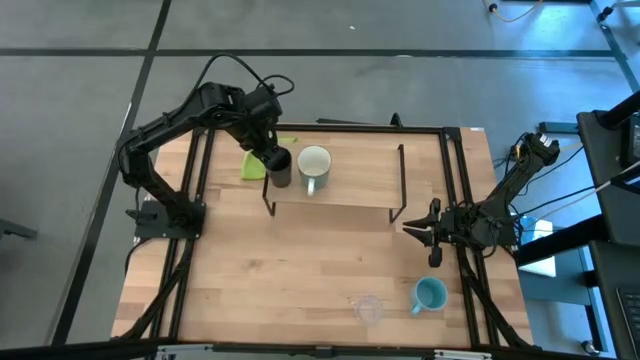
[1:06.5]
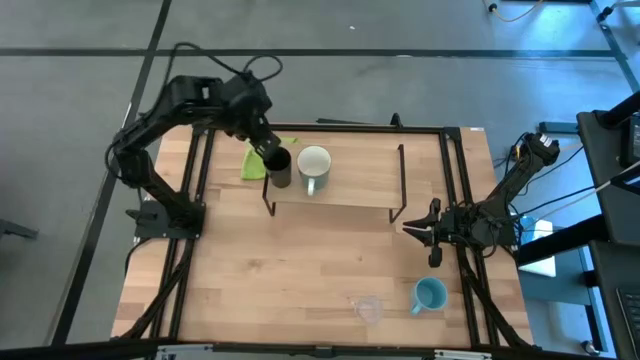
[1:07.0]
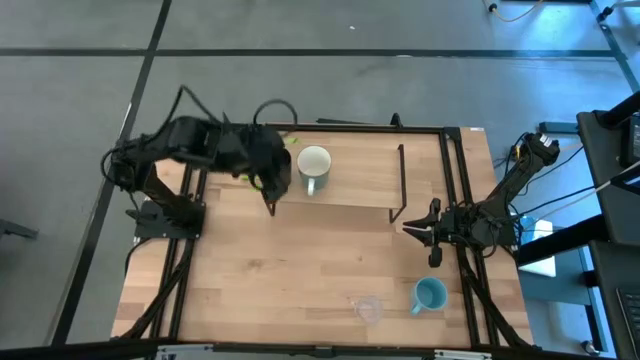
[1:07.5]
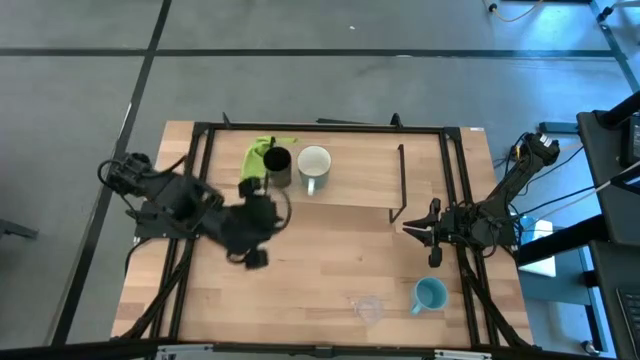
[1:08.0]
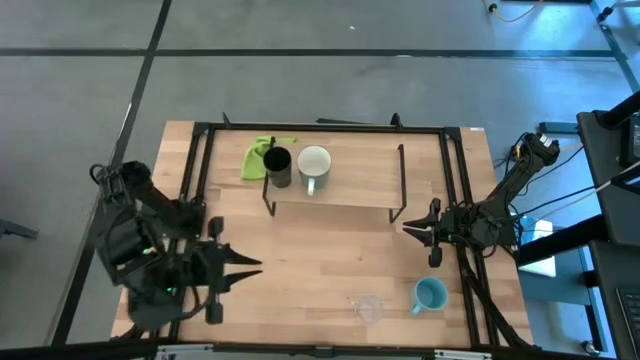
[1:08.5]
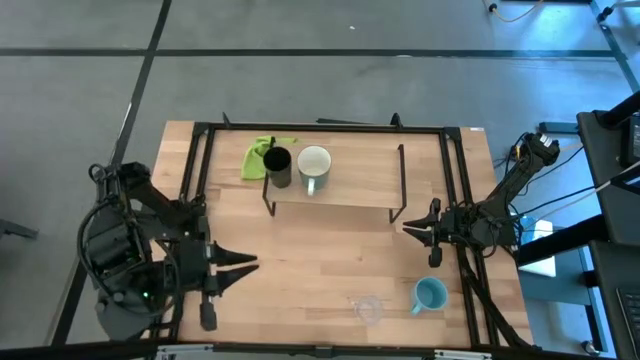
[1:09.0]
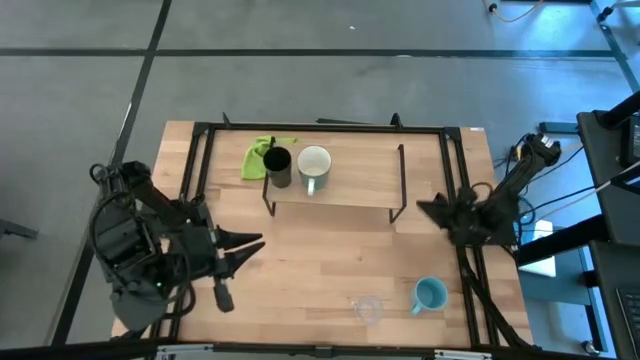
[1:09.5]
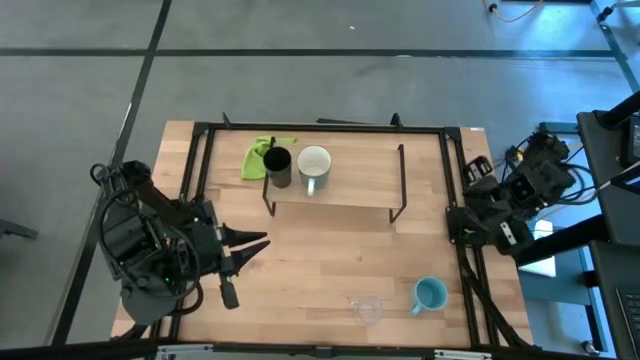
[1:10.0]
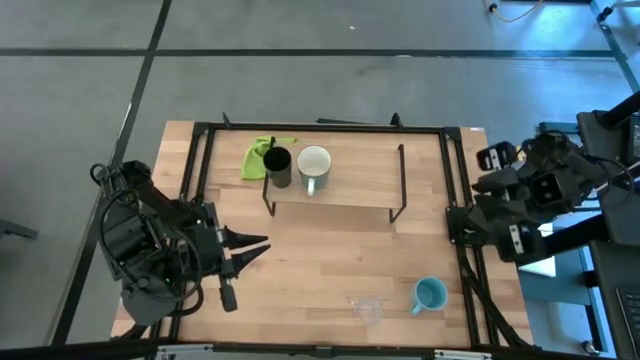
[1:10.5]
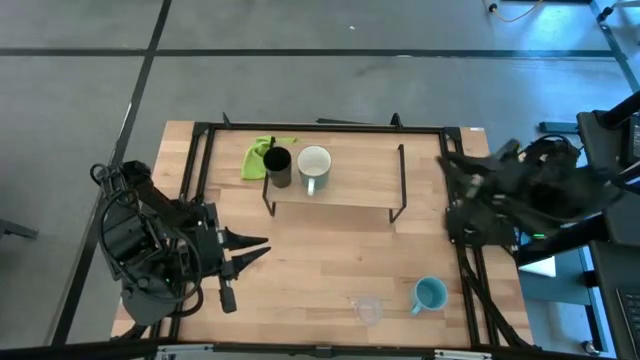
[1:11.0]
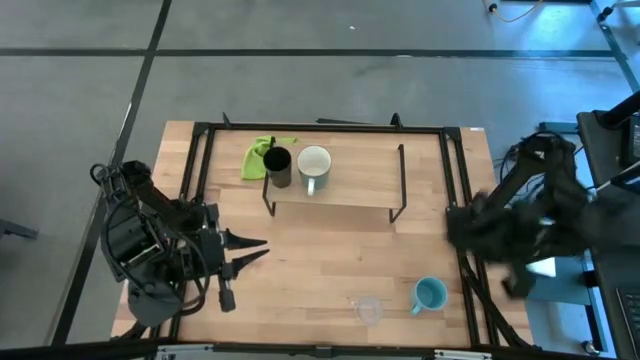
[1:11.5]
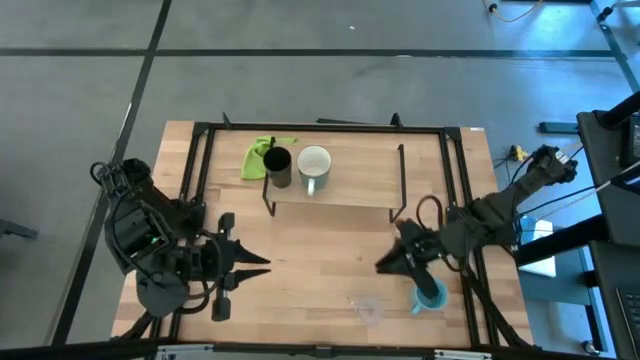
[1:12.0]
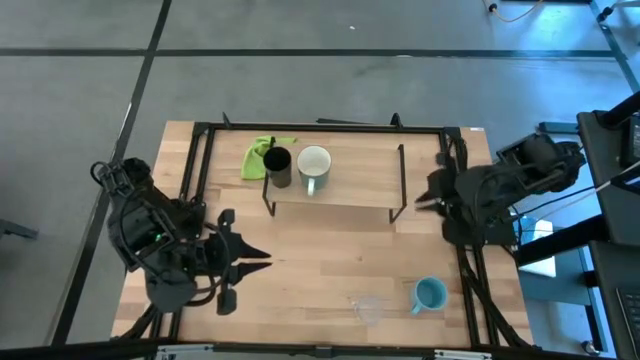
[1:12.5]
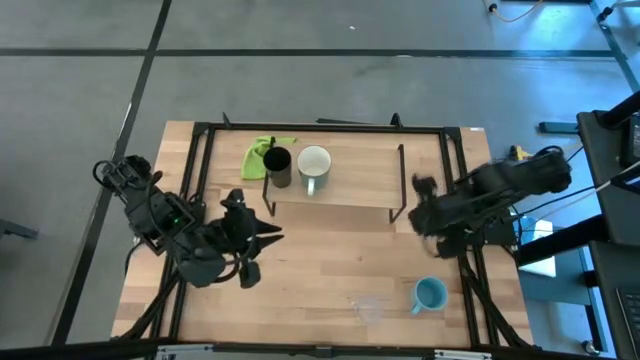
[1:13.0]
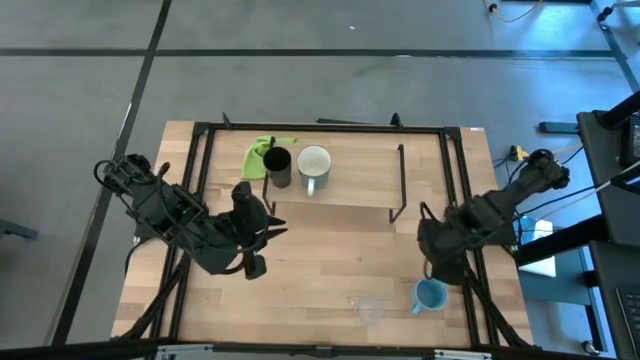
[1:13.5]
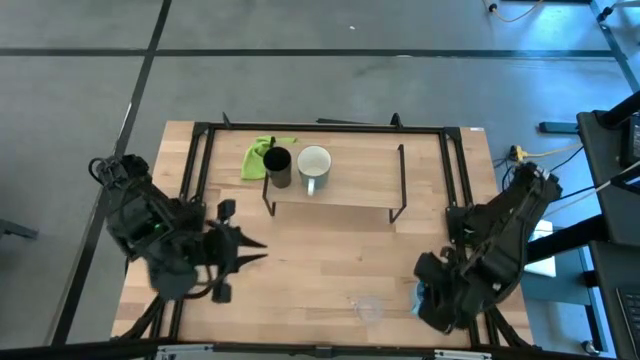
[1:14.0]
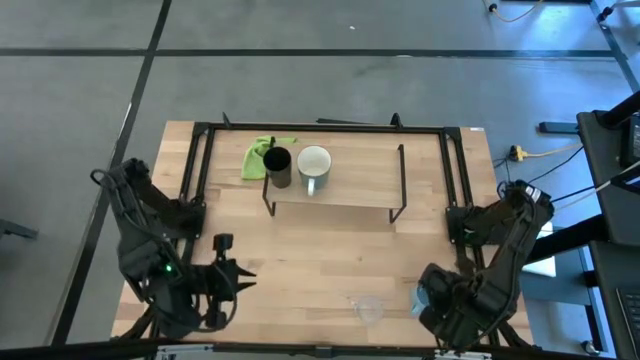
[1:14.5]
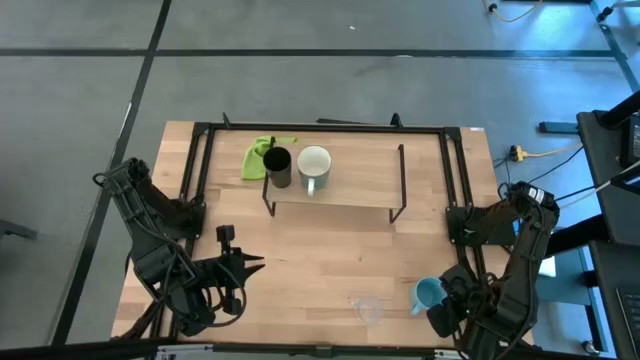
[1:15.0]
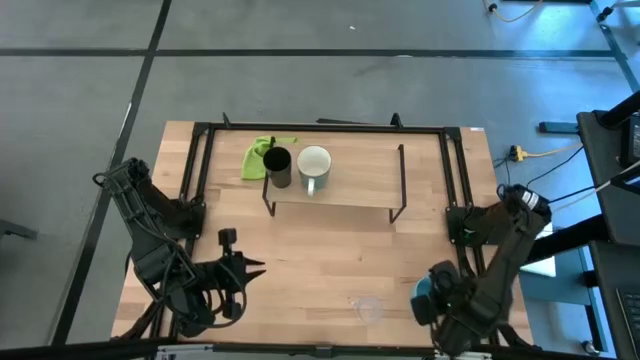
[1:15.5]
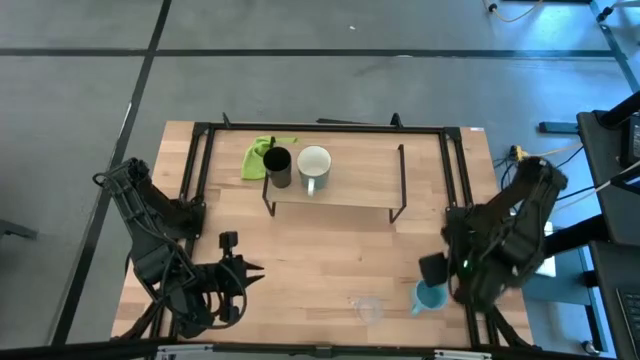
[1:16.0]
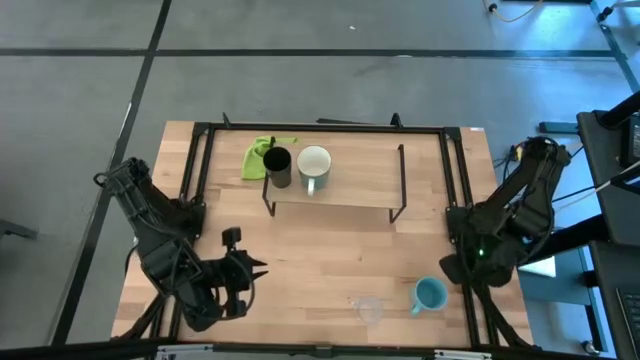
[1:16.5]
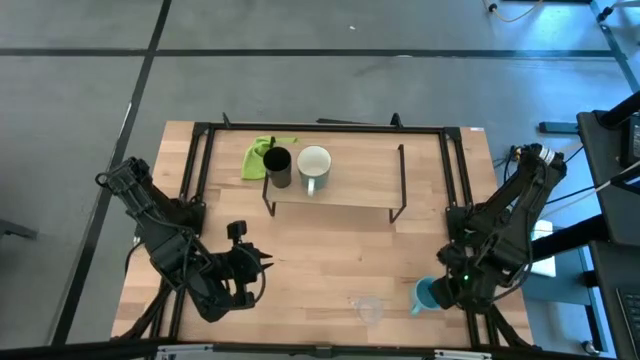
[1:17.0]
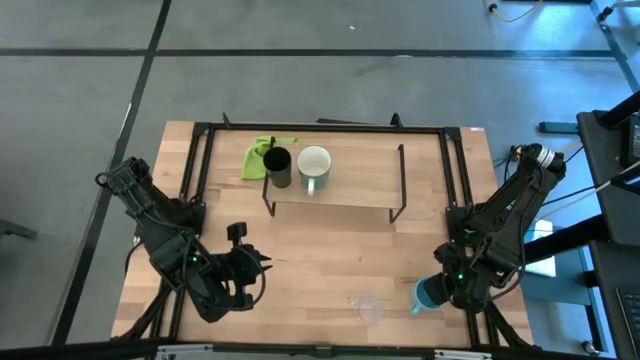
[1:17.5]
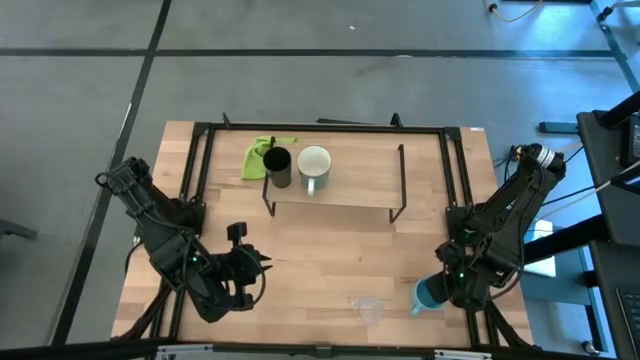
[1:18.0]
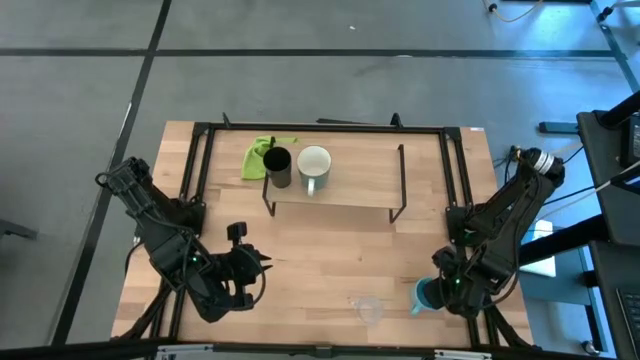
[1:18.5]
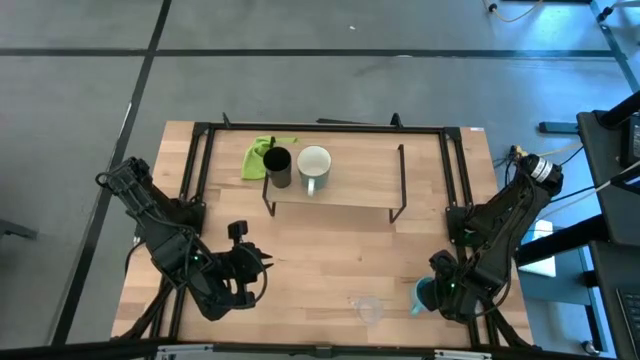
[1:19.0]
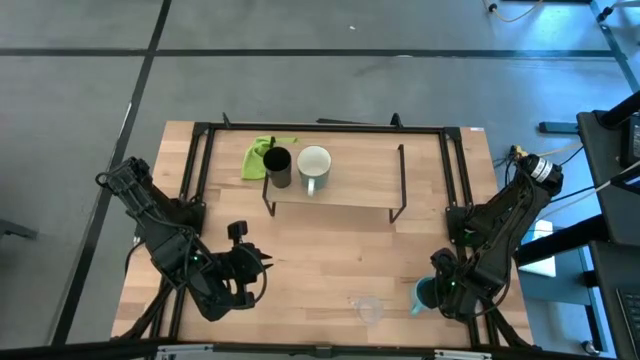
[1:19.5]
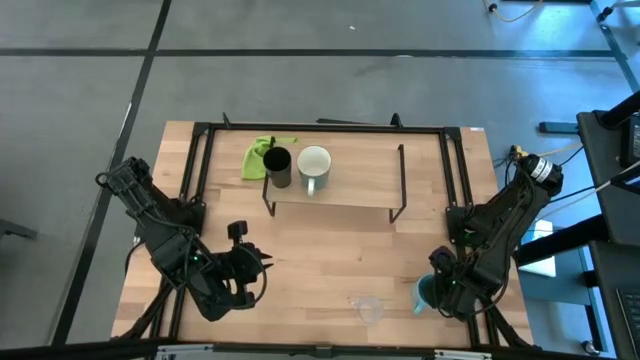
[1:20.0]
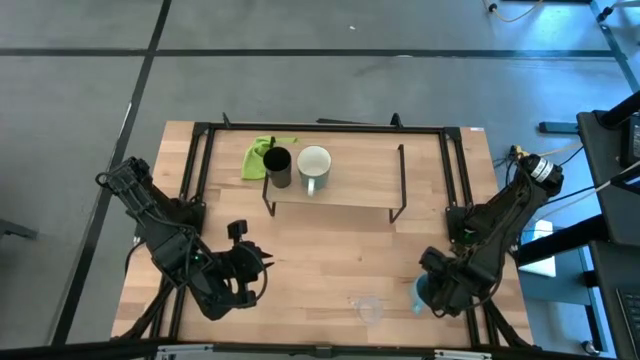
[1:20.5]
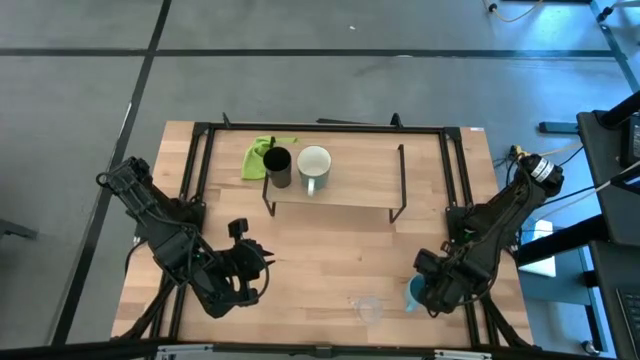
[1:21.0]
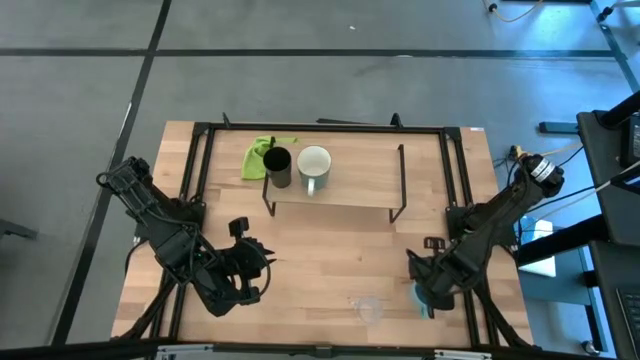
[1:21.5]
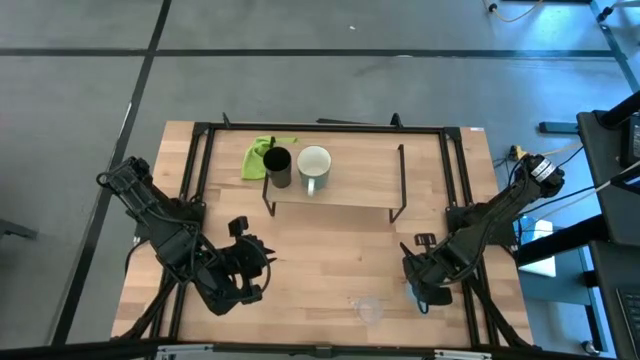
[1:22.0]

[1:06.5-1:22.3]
Task: Stack small to large cups/mugs on shelf
Put the blue mug on the shelf

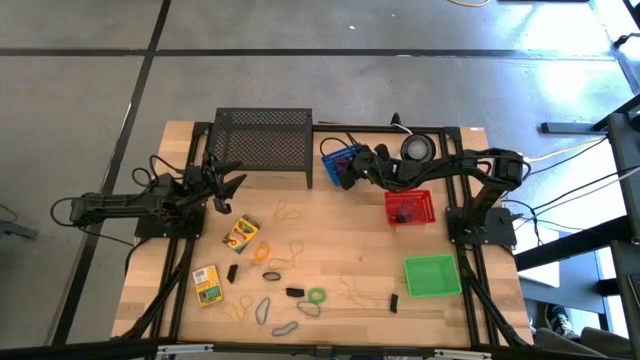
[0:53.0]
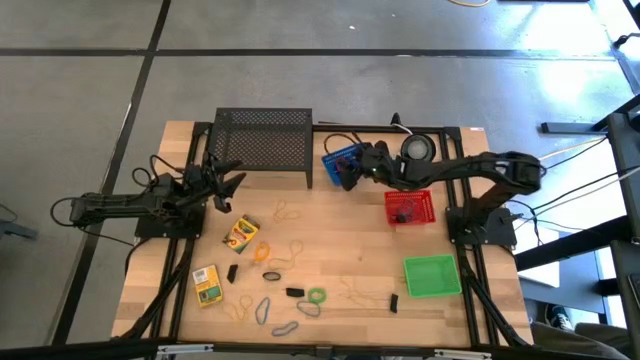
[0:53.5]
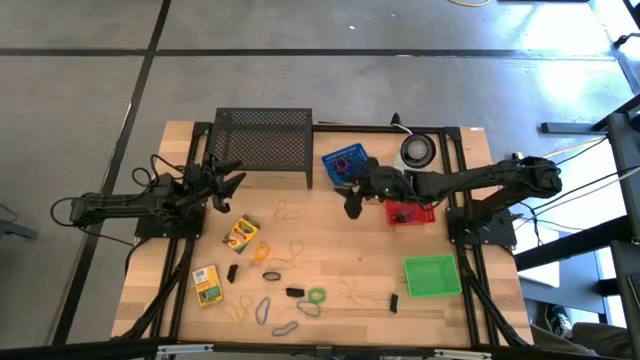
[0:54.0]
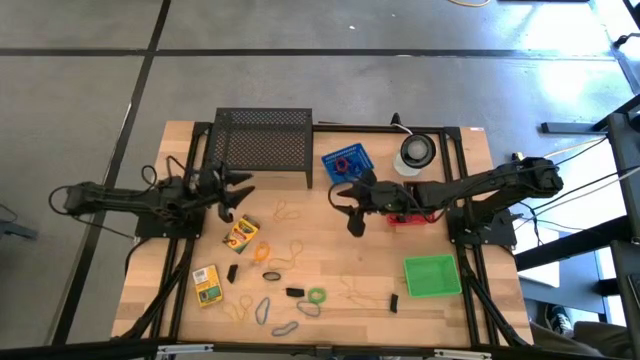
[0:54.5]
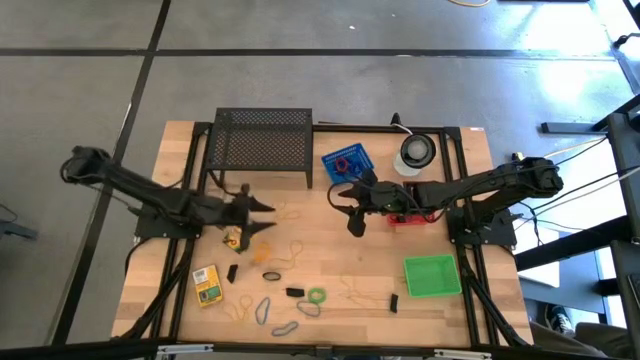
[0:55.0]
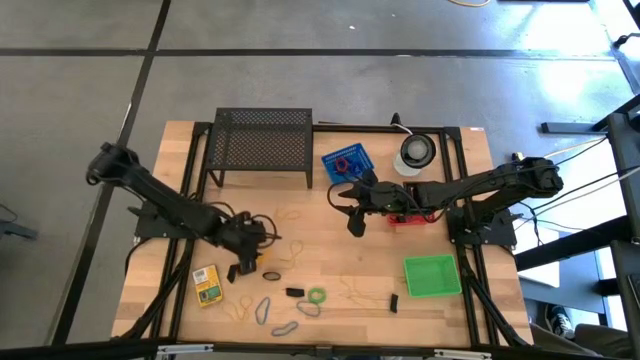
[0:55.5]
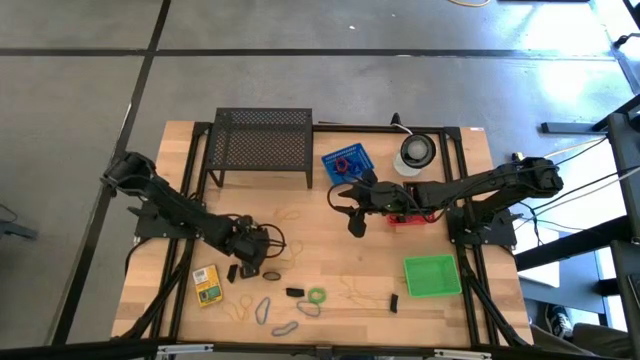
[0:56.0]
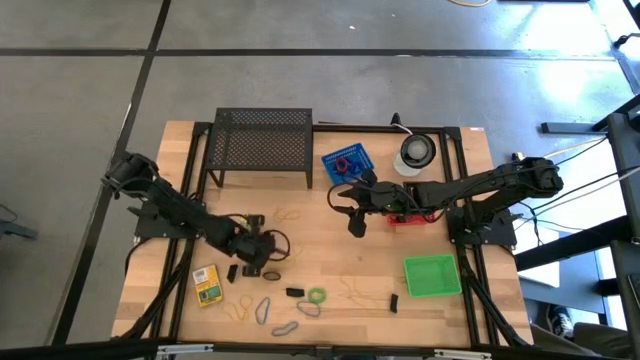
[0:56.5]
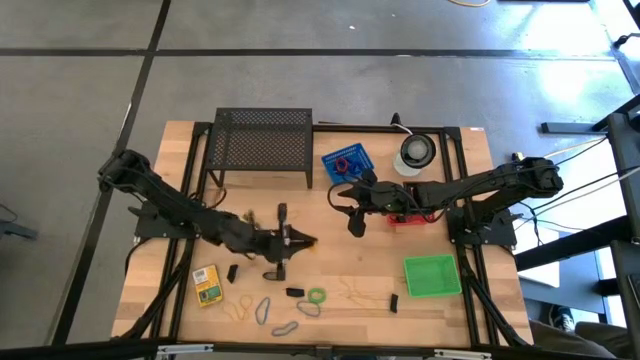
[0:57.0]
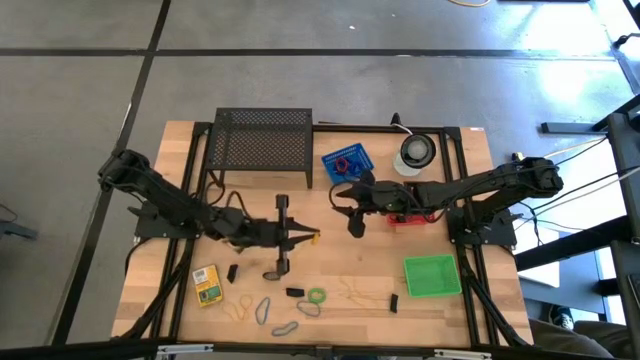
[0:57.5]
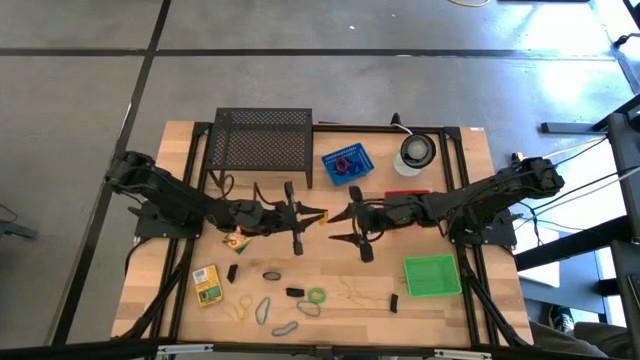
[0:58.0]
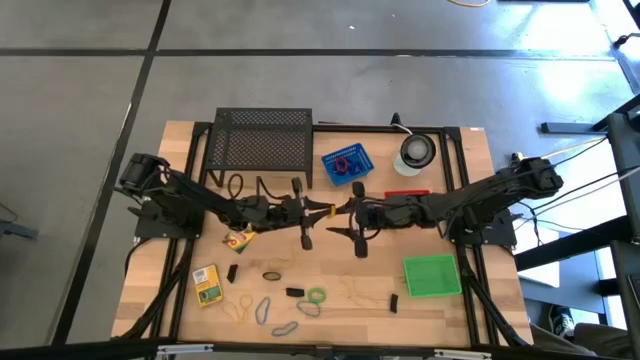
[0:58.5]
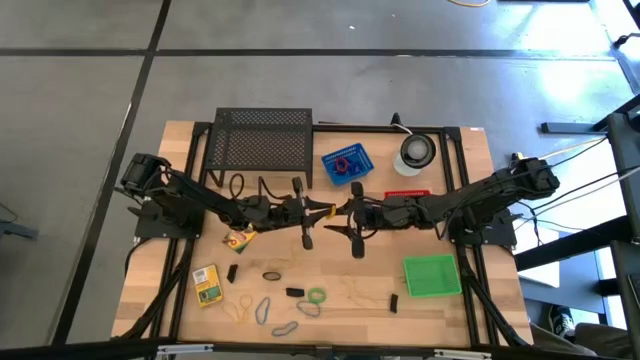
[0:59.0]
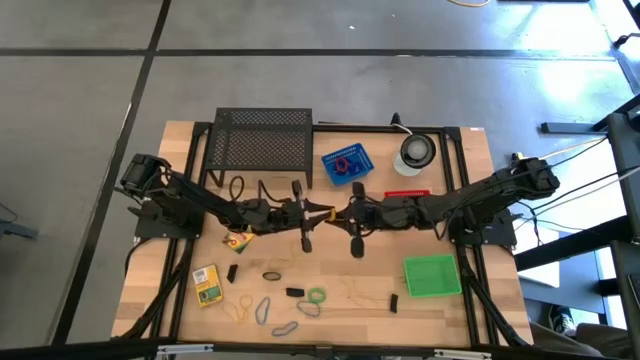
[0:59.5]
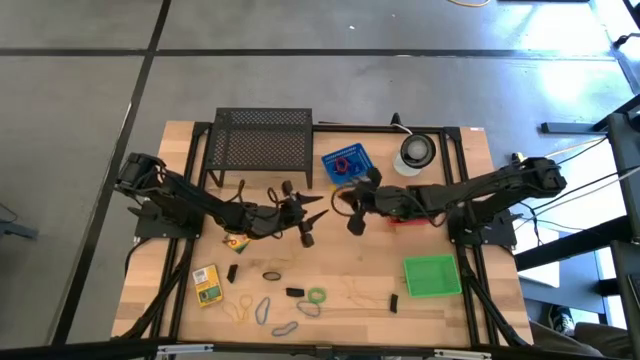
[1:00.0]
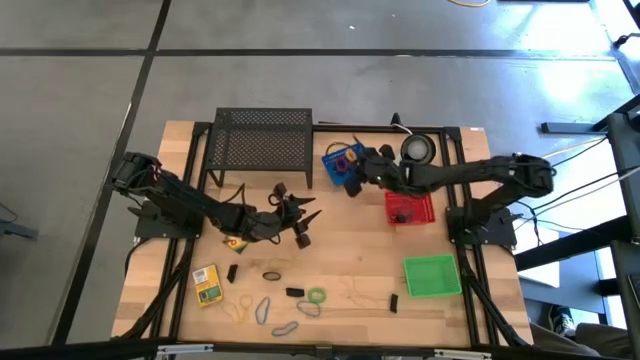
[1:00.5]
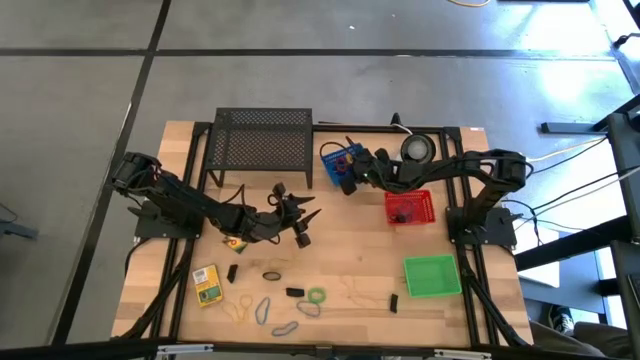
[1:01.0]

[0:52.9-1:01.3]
Task: Pick & Place Office Desk Supplies
Put the yellow wrist coil into the blue bin
